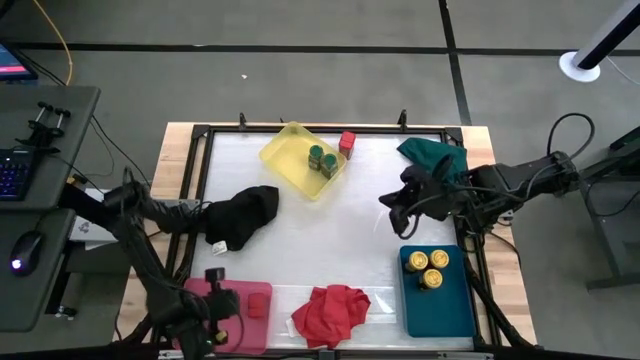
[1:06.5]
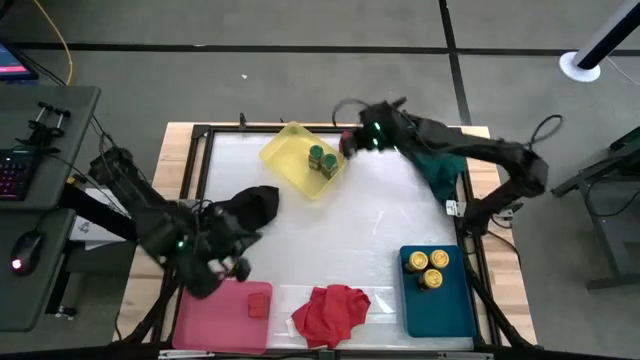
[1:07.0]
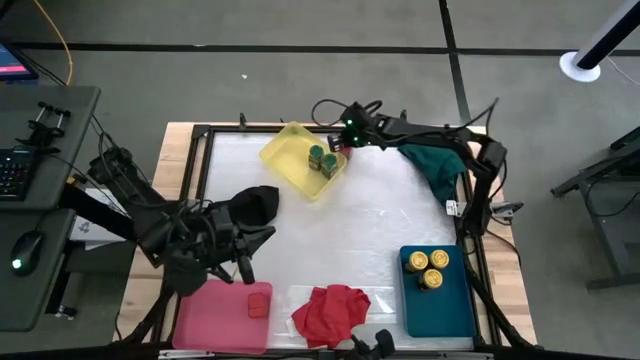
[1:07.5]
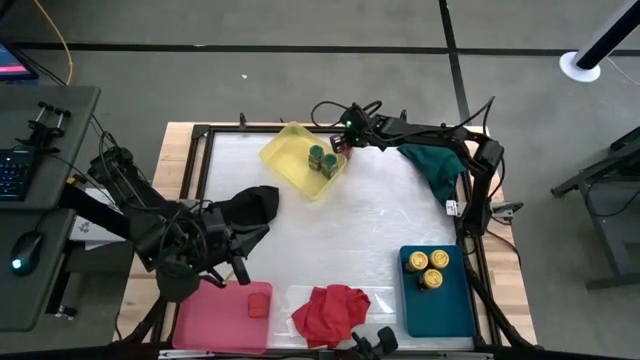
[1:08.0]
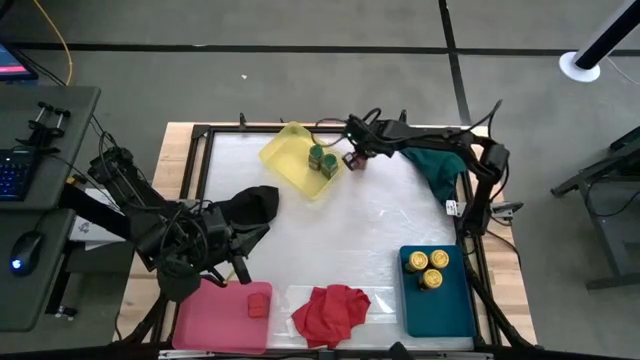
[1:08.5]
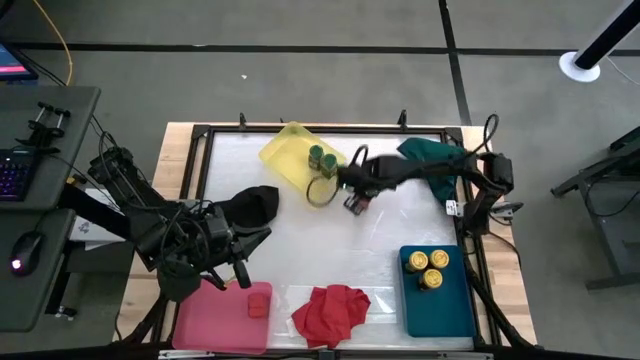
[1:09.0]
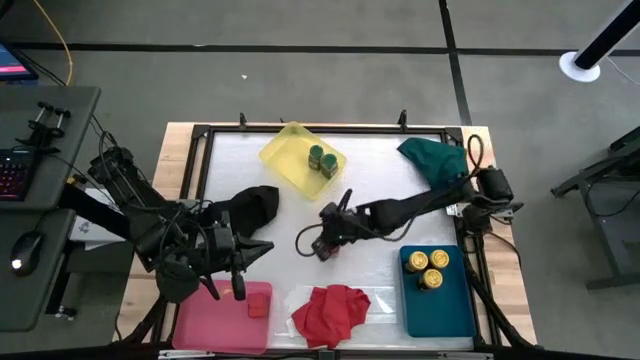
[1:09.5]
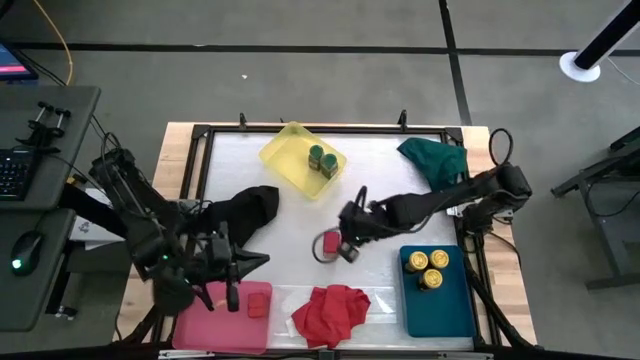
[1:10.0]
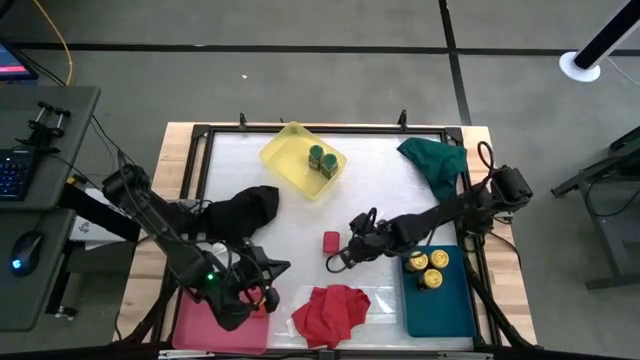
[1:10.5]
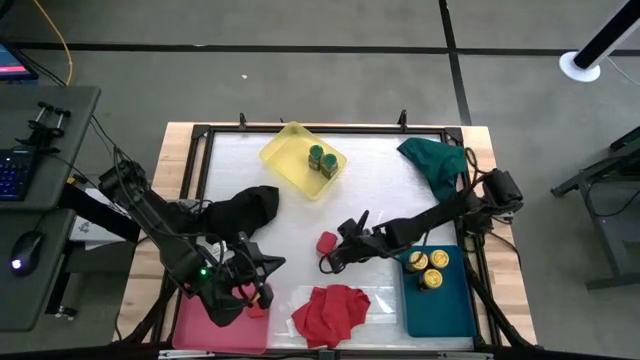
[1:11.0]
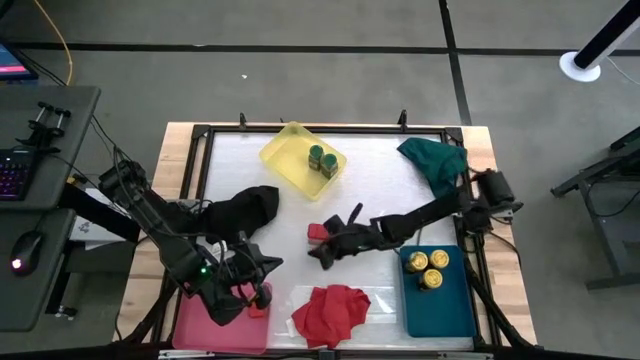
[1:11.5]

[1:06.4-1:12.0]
Task: Sort spices by type
Move the red seasoning can to the center of the table

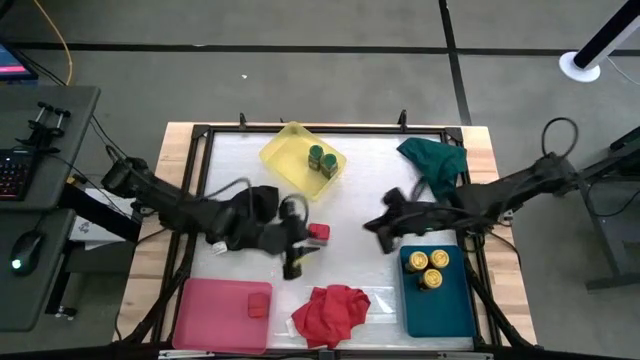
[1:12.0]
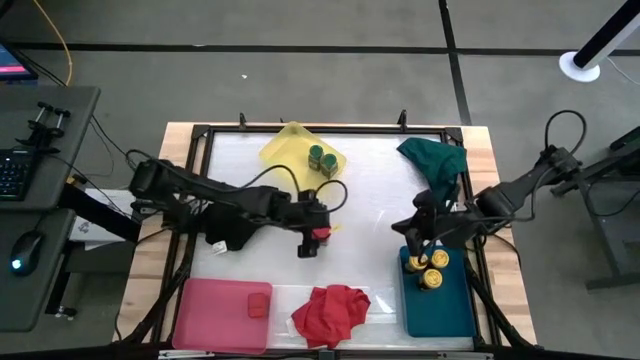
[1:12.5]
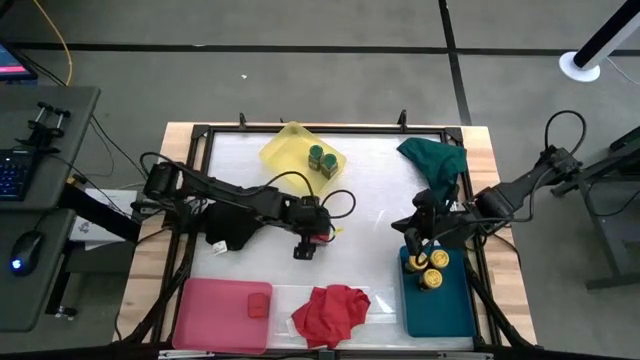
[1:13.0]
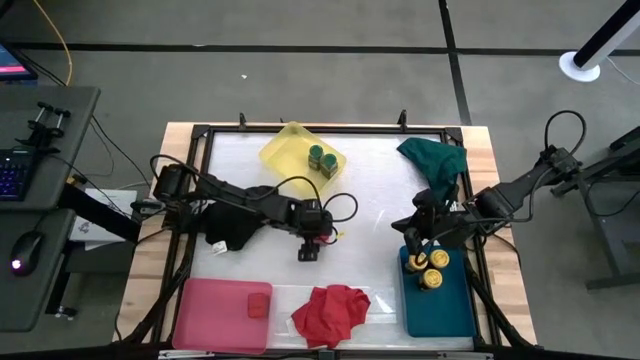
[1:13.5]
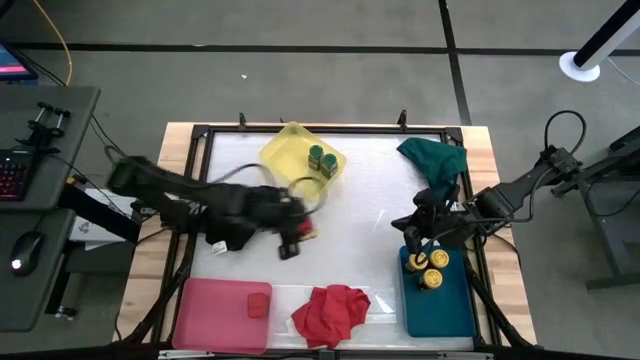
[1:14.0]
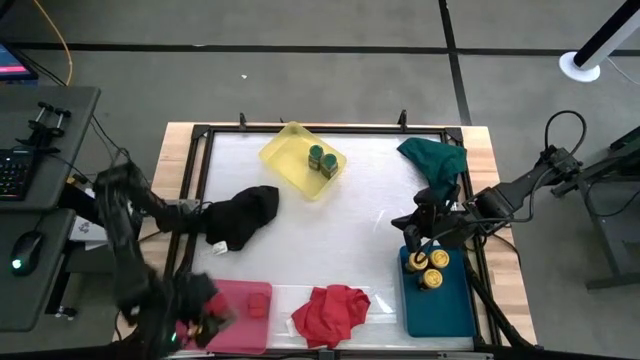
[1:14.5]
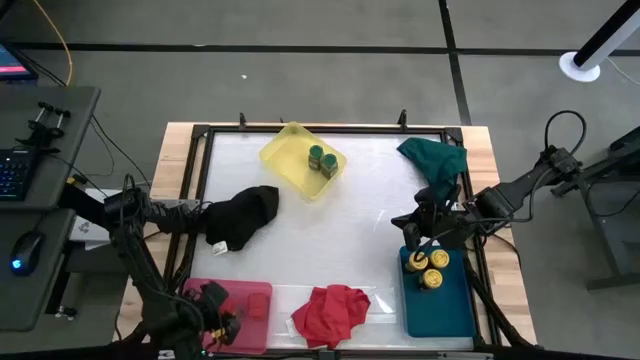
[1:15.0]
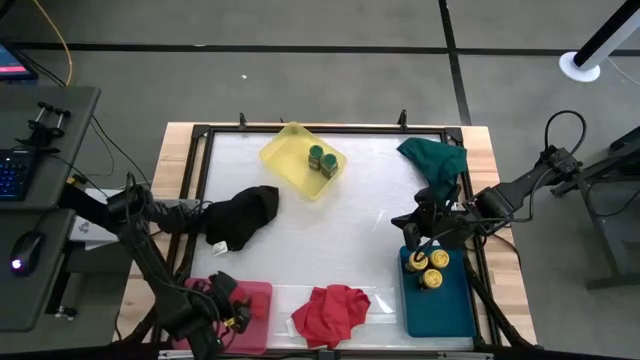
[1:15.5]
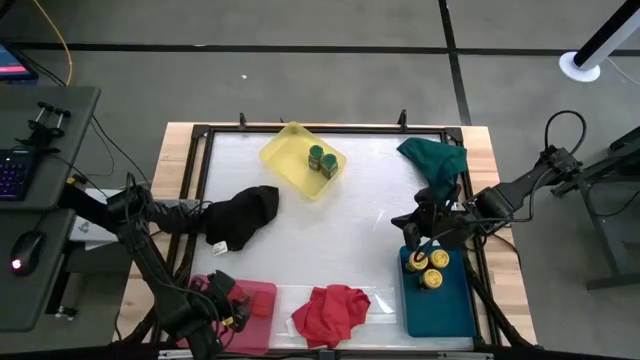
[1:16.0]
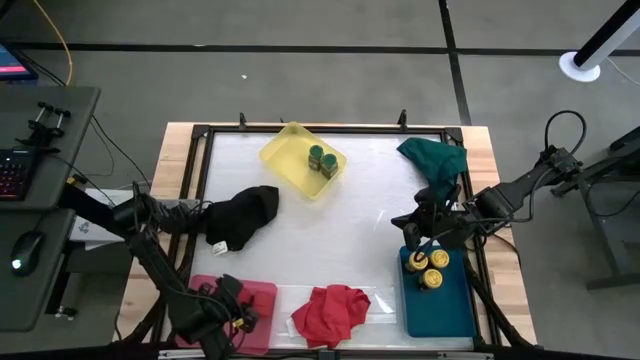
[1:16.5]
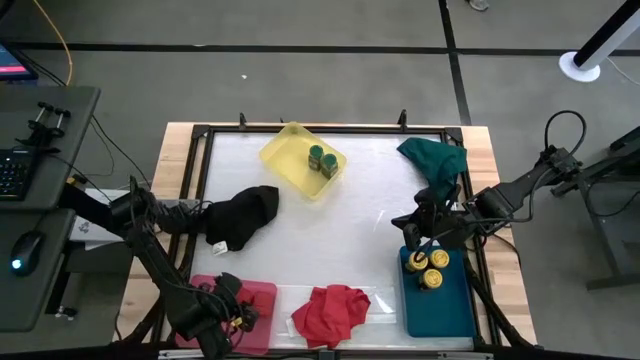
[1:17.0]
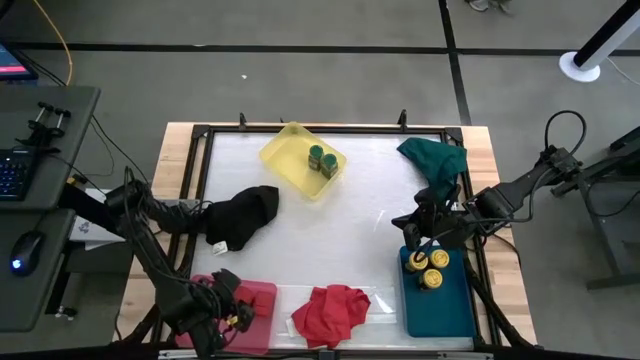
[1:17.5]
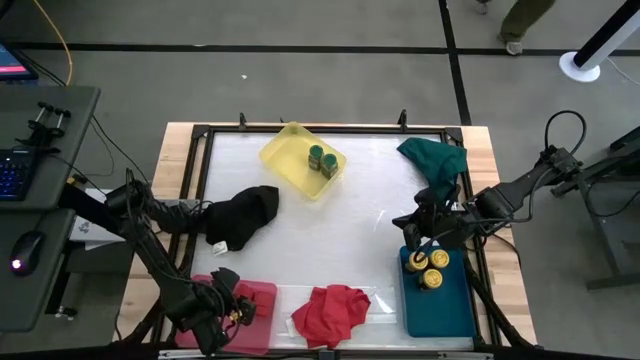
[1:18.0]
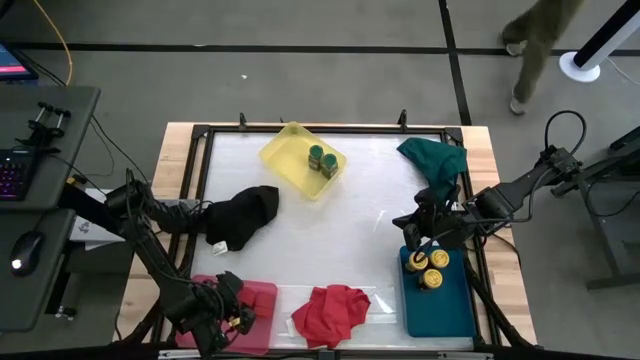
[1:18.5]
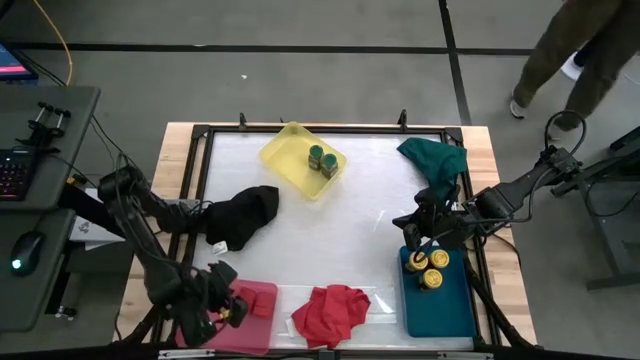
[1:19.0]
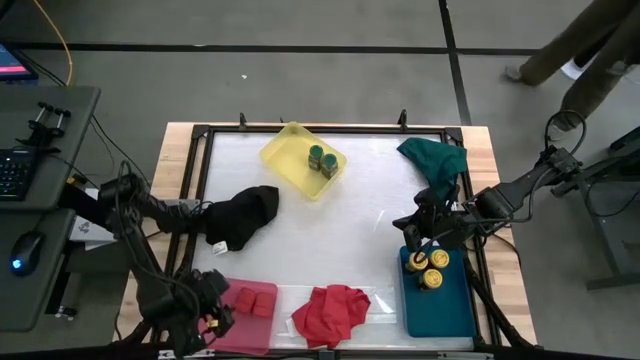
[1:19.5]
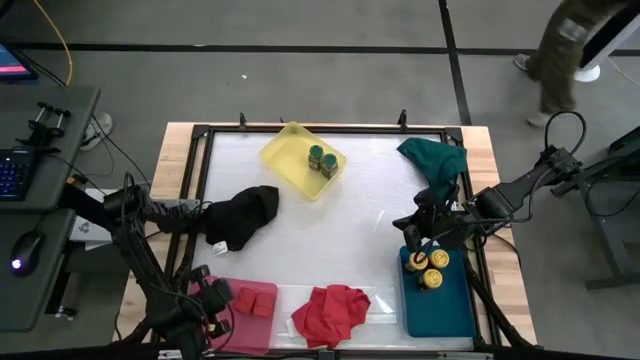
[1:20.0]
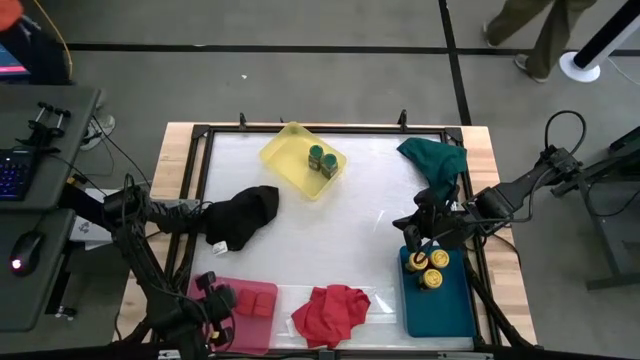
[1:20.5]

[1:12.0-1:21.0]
Put the red seasoning can into the red bin

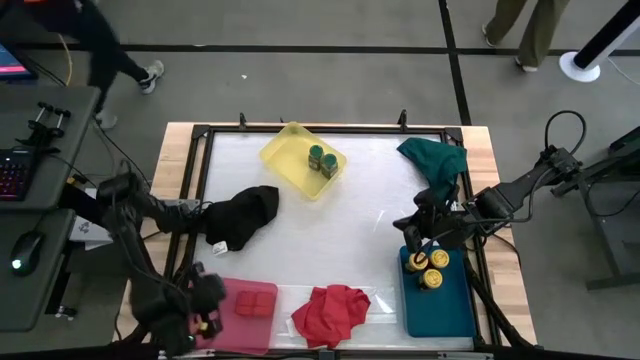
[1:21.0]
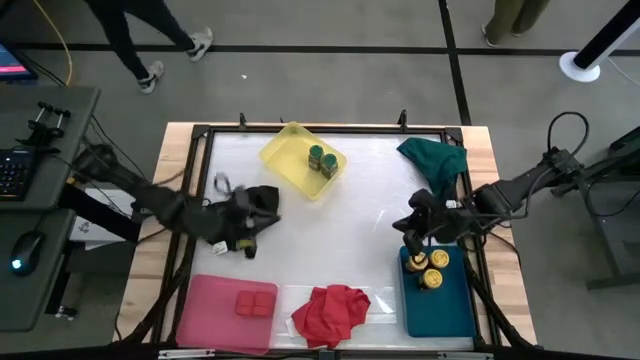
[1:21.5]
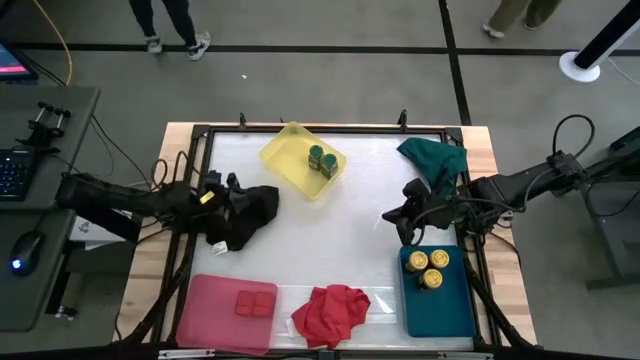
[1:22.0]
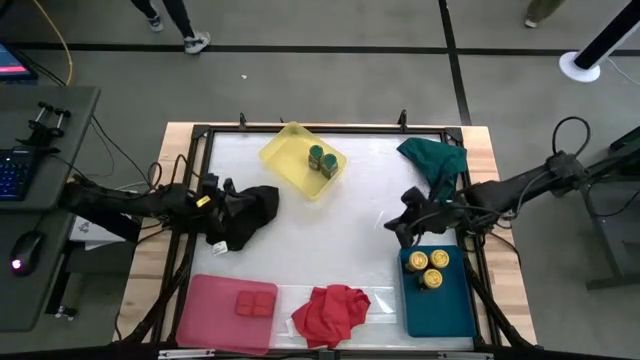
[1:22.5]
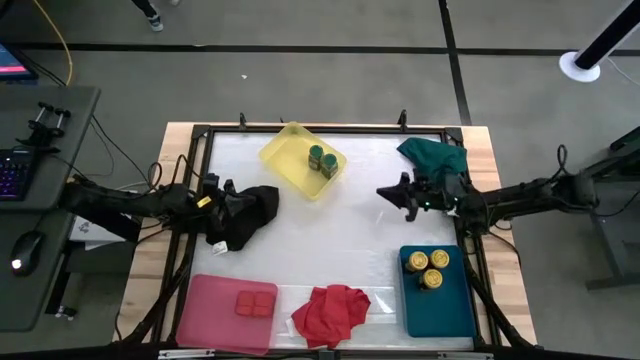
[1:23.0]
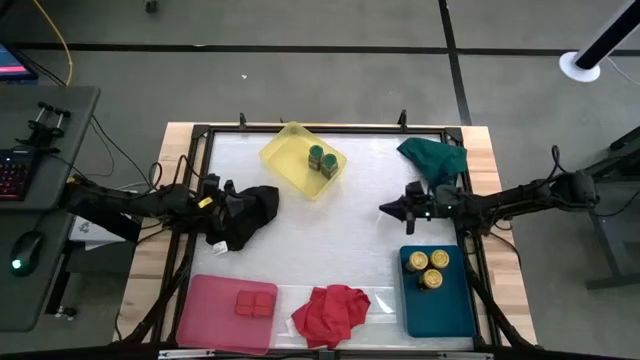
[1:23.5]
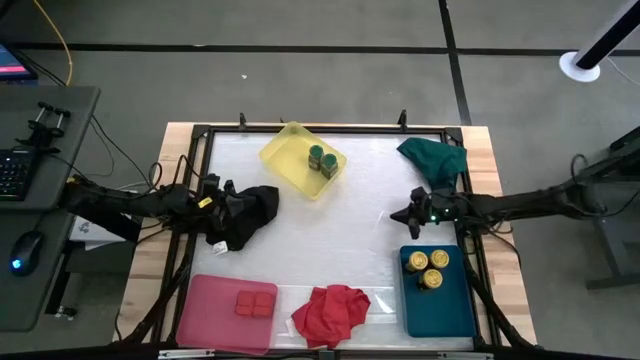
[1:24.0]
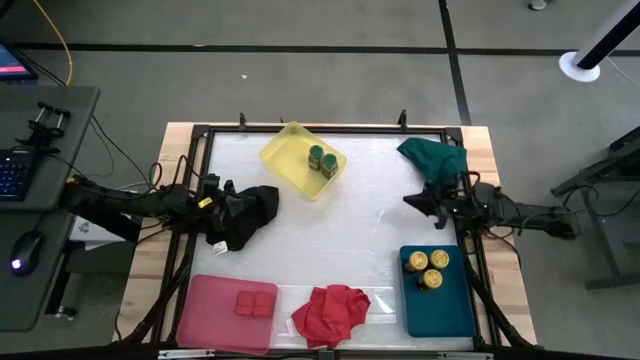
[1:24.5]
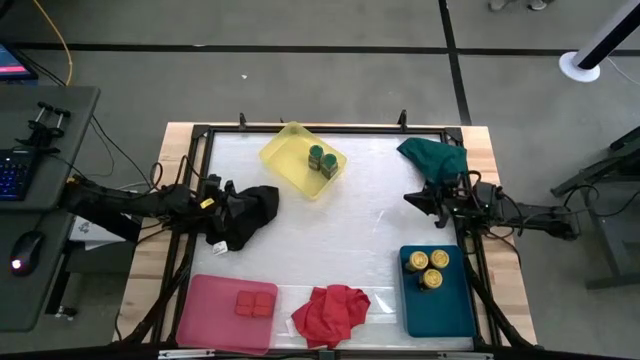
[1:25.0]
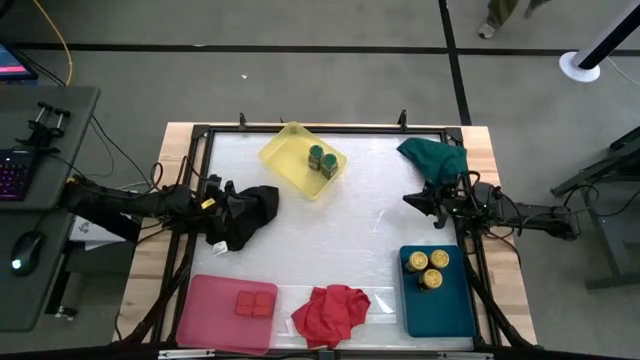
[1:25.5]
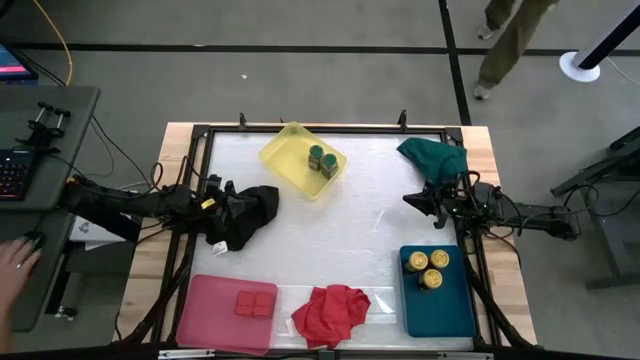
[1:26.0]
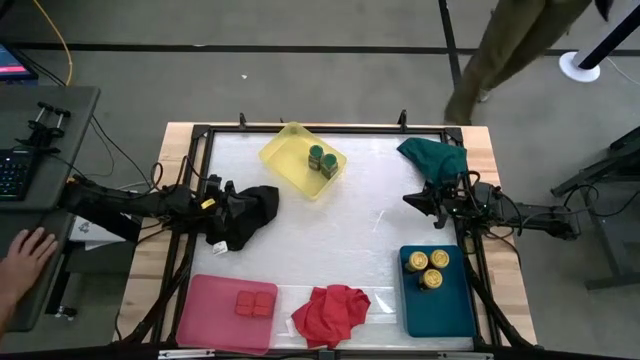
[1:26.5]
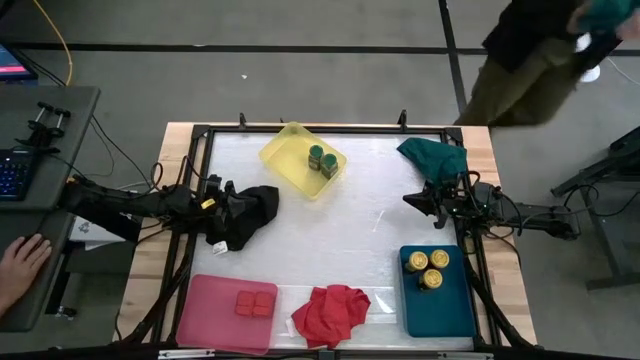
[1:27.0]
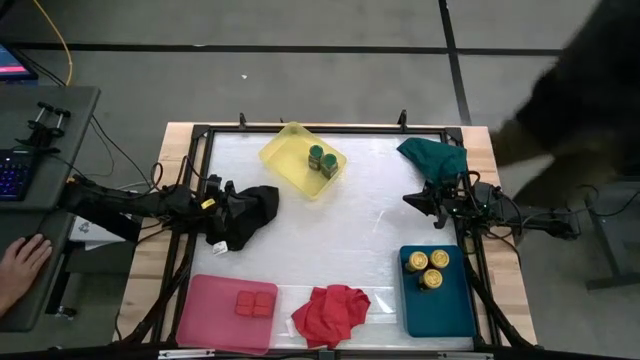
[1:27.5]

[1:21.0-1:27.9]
Return to Home Position

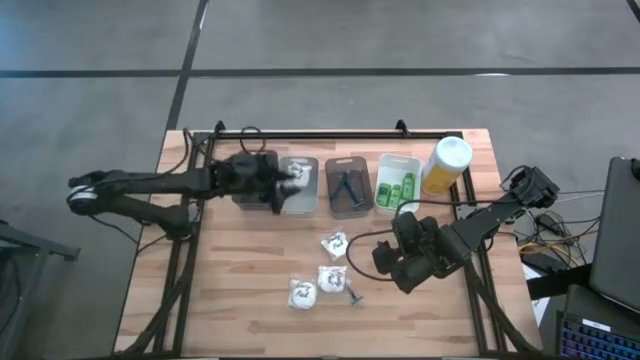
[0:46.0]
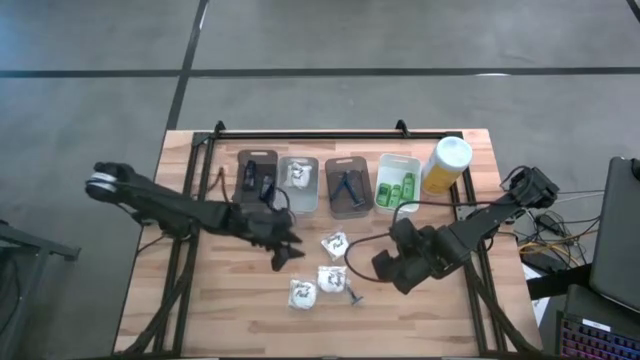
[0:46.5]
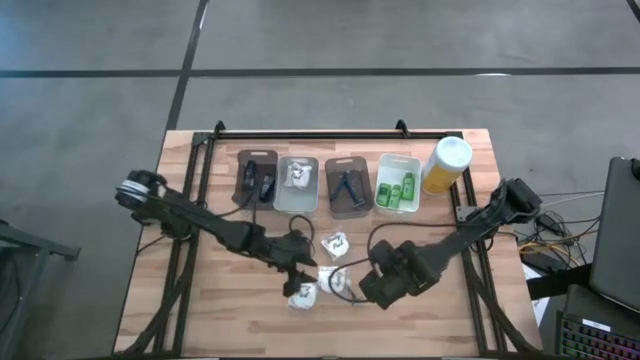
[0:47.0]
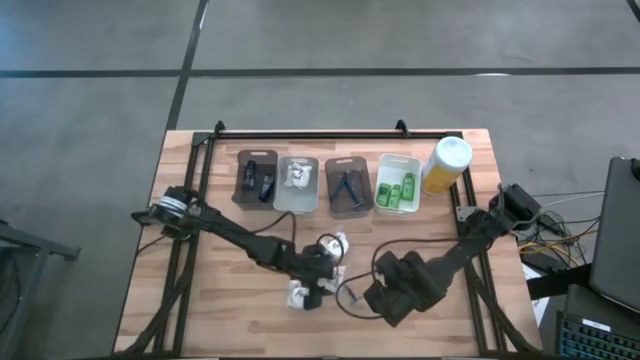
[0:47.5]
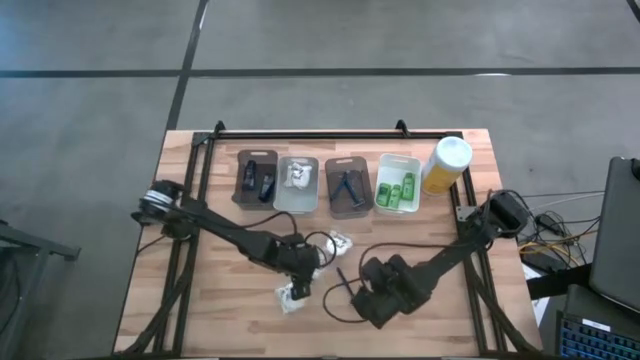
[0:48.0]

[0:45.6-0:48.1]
Task: Pick & Place Travel size toiletries
Adjust the white cotton pack
